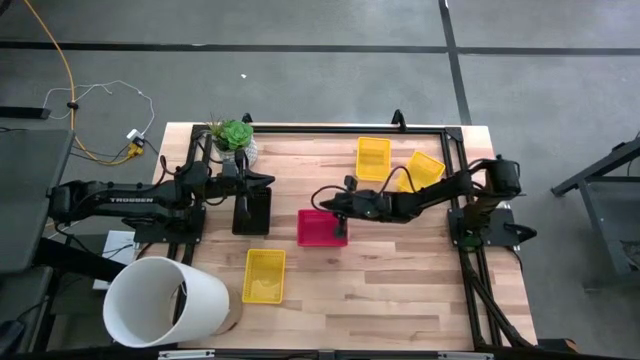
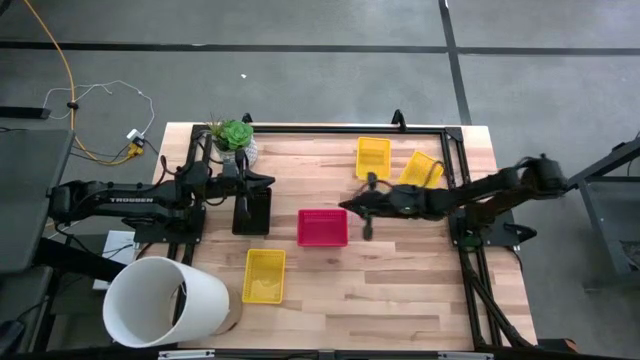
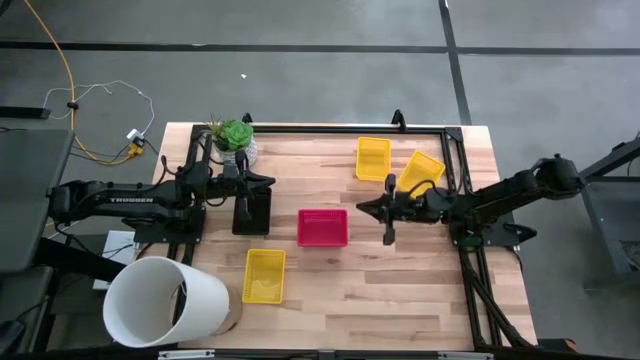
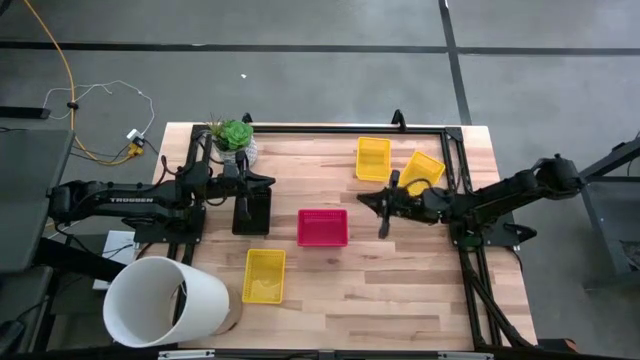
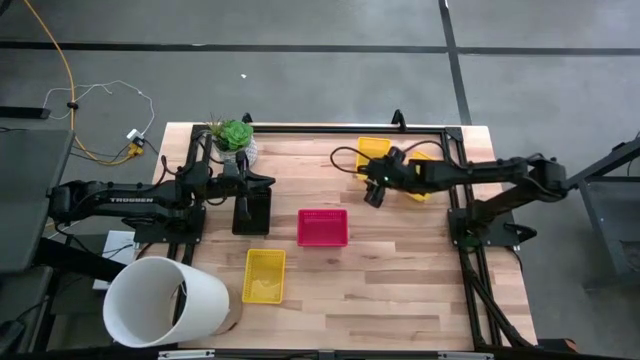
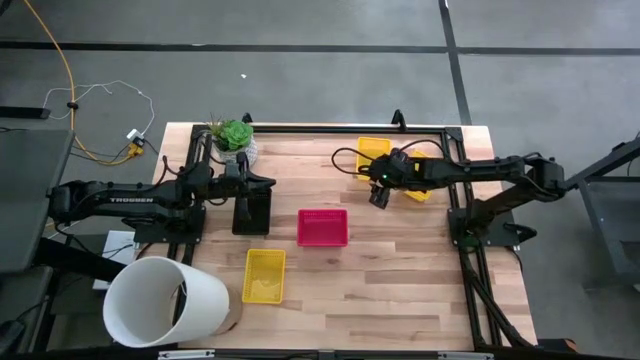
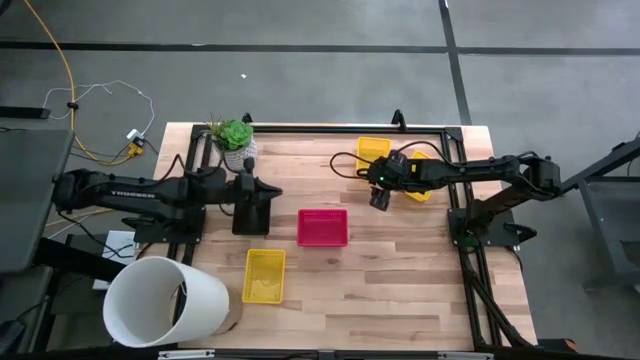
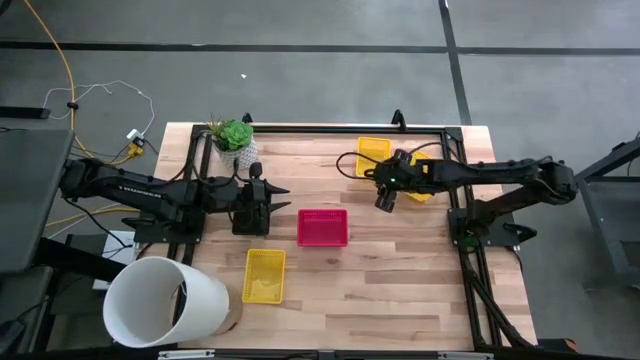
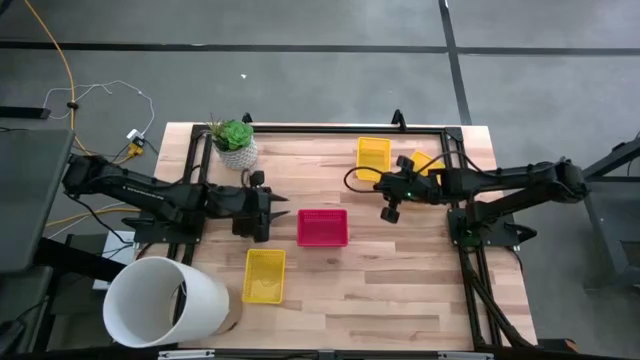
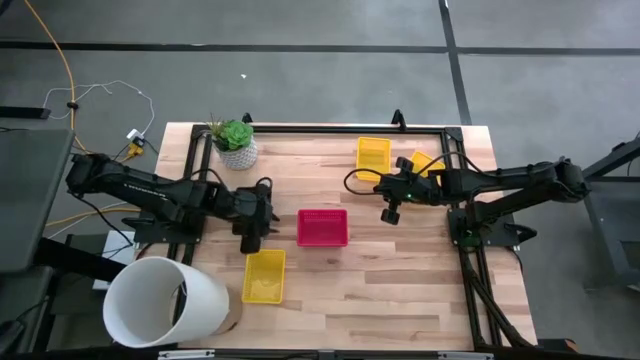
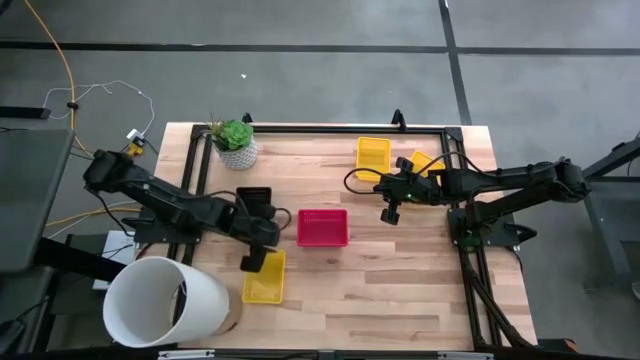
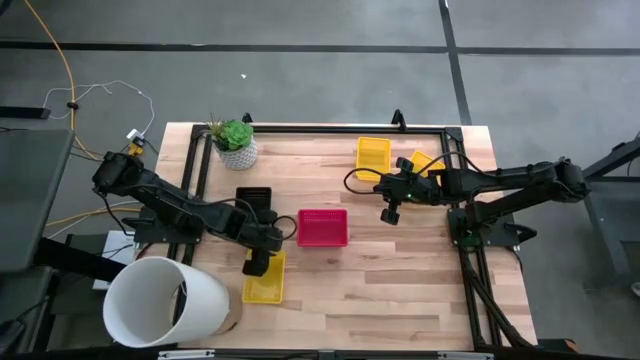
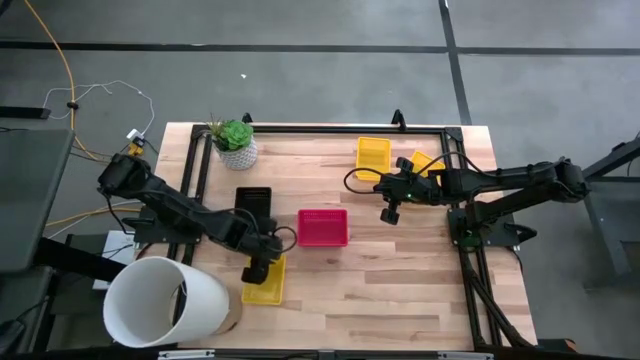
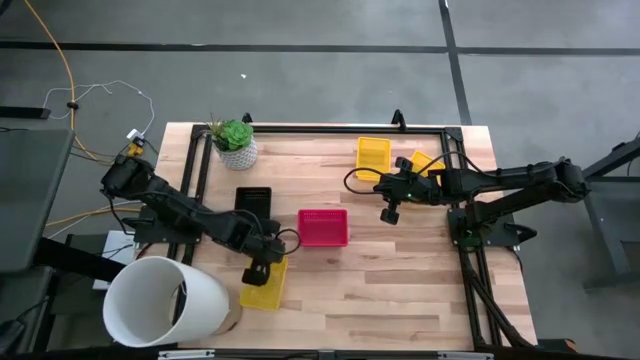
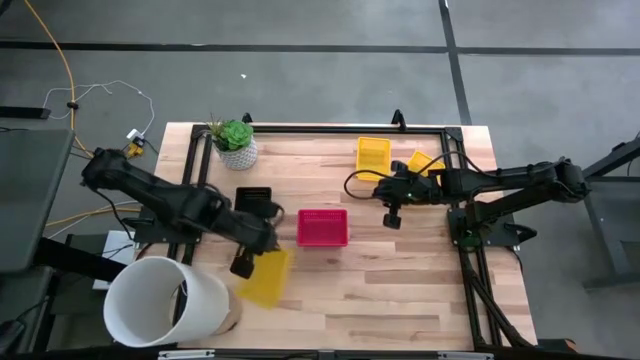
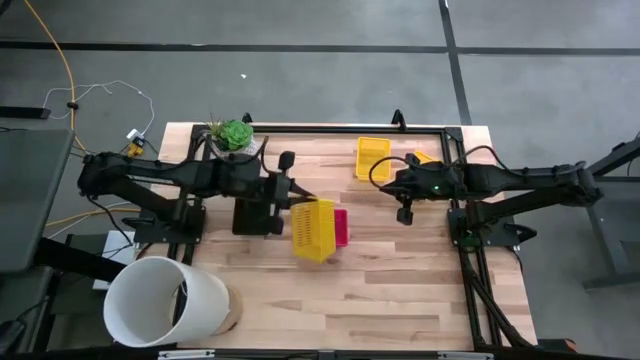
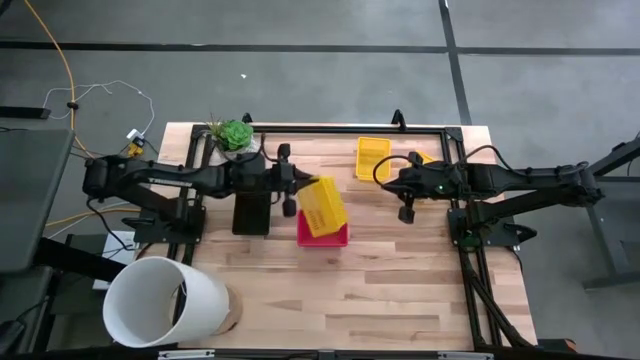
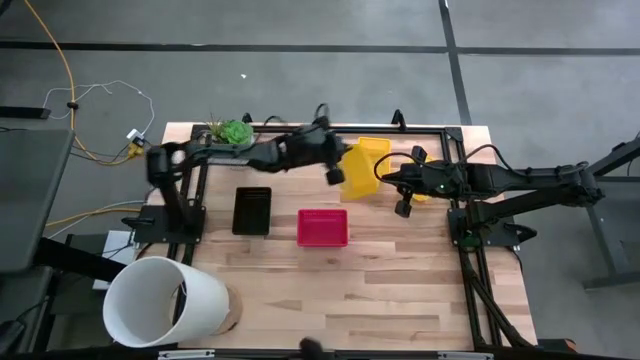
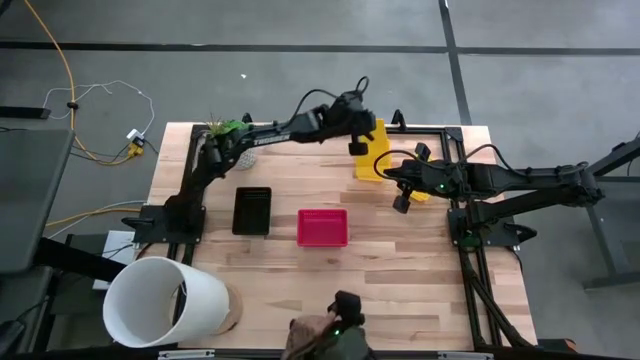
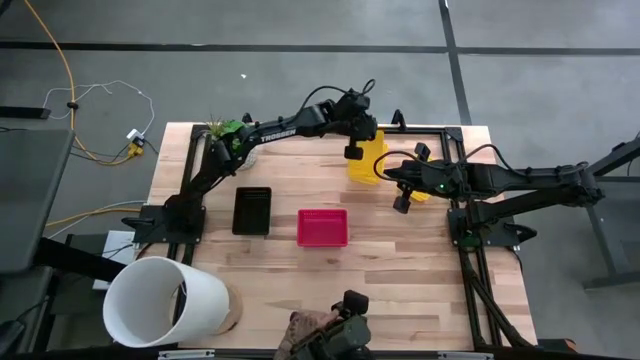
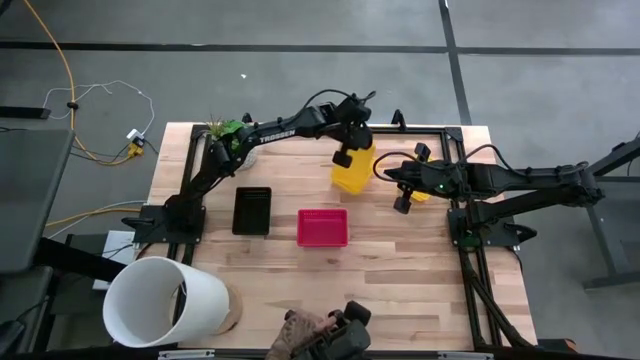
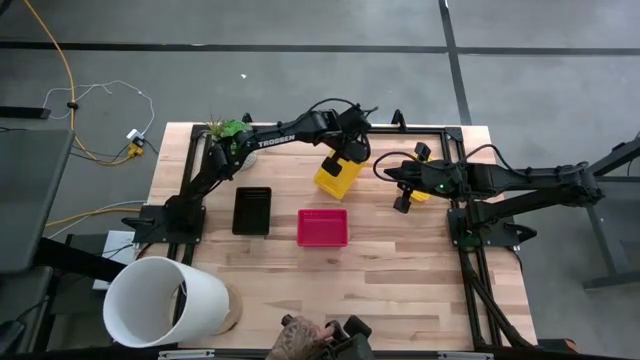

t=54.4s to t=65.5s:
Stack the bottom yellow bin into the top left yellow bin

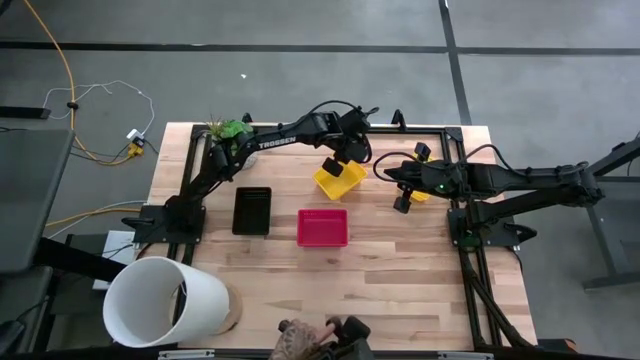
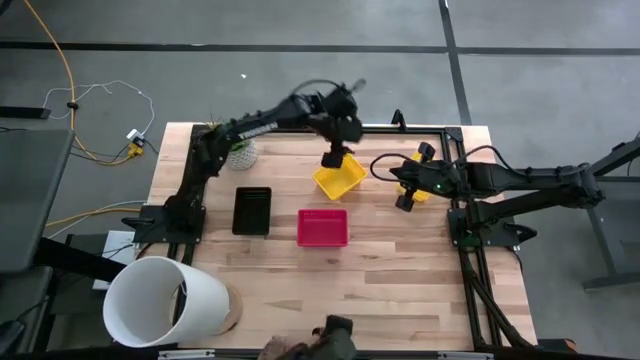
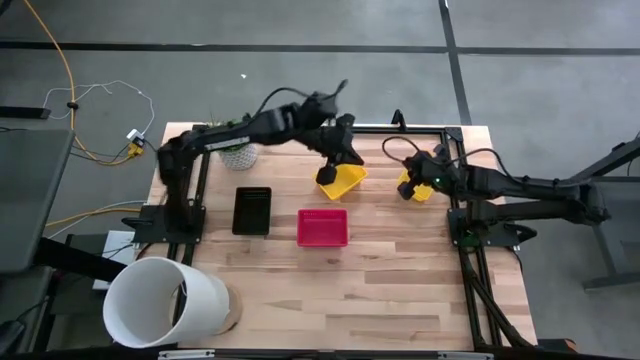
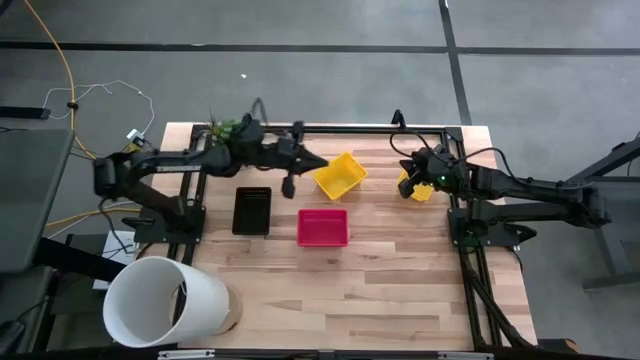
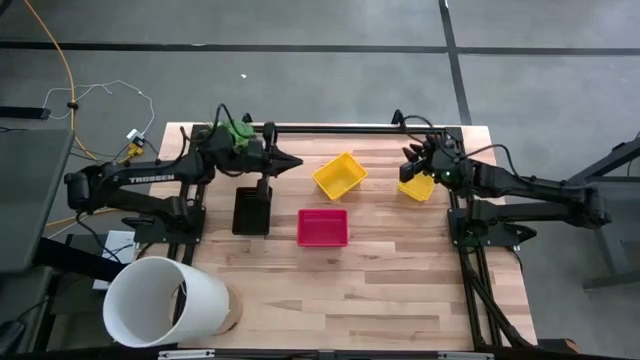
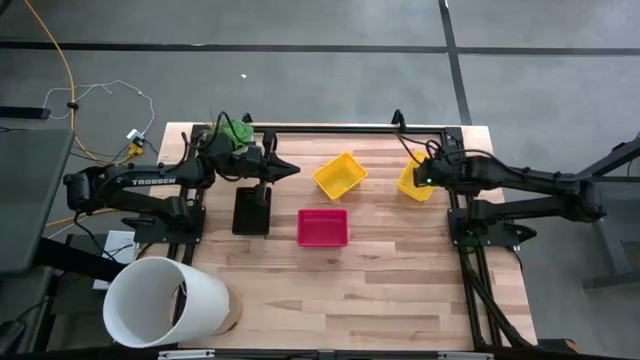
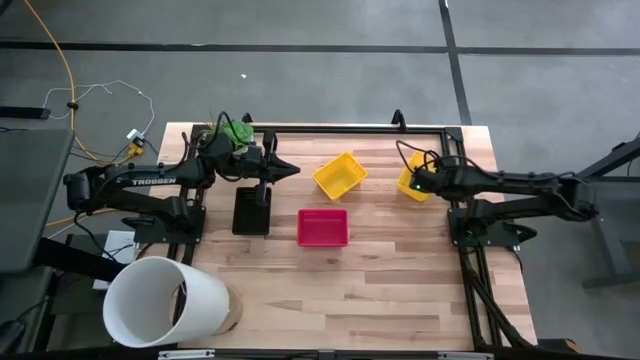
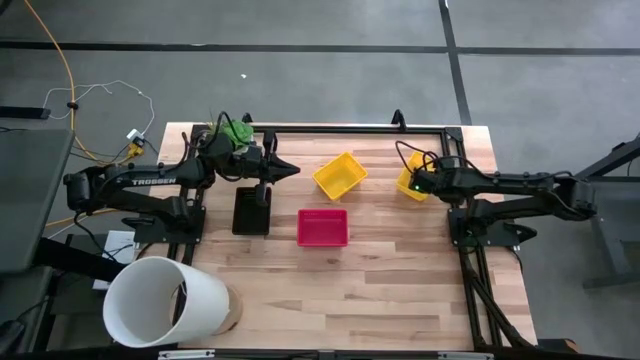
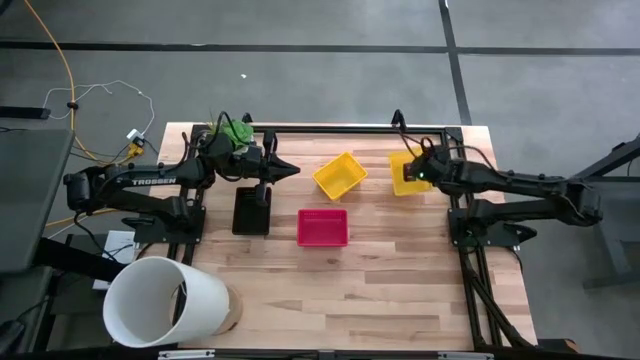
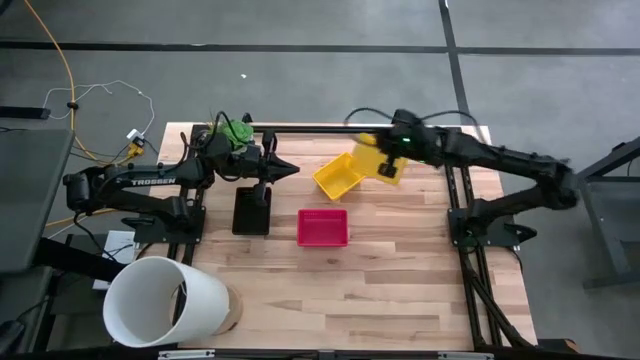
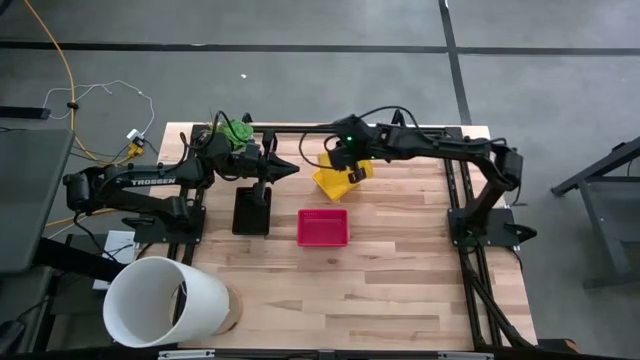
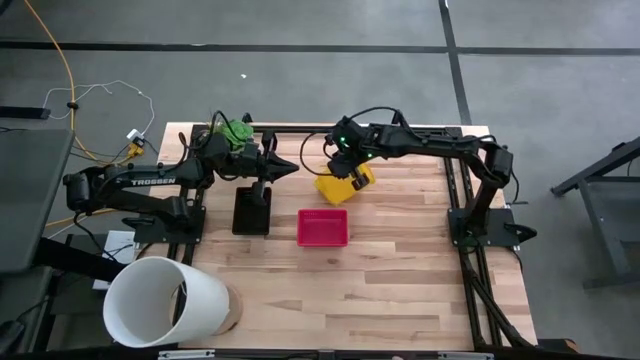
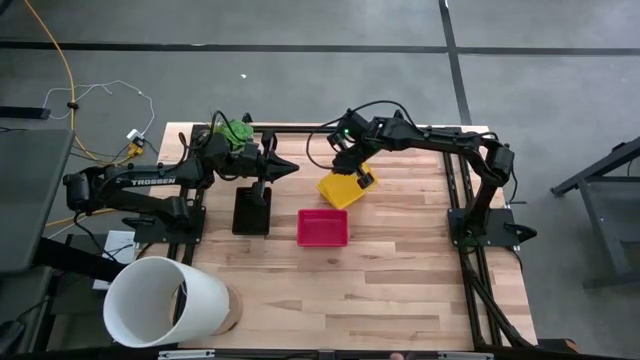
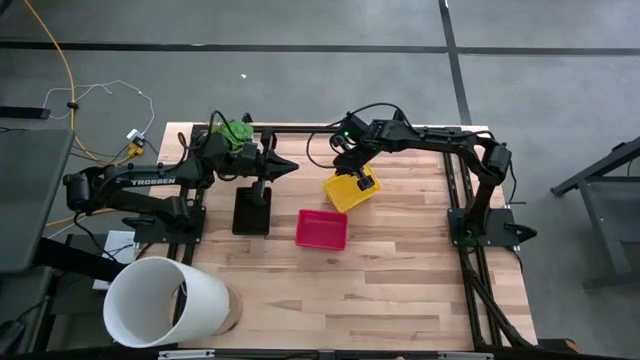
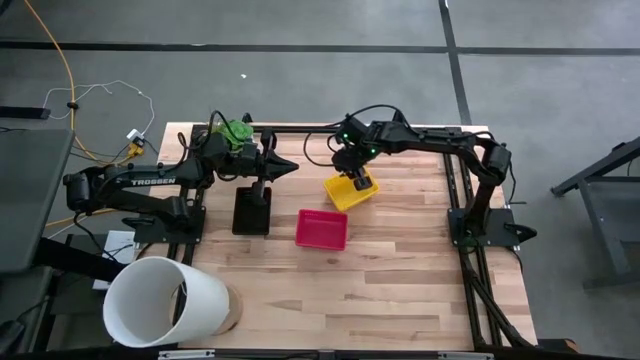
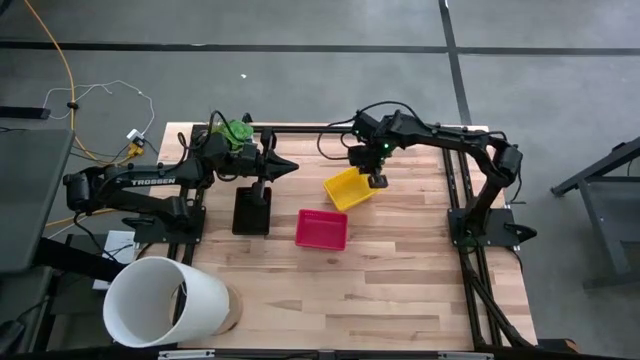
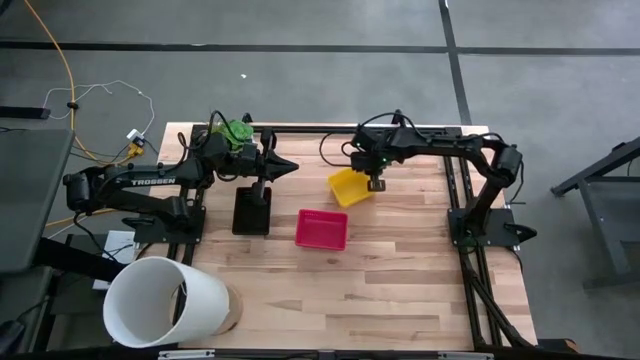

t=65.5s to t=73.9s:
Stack the right yellow bin on top of the left yellow bins

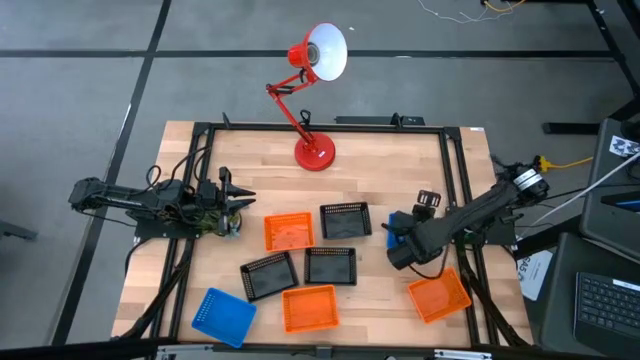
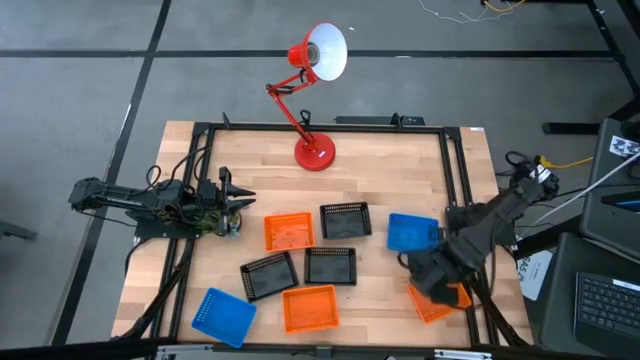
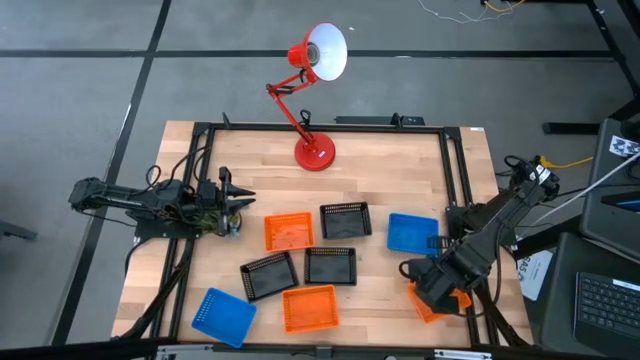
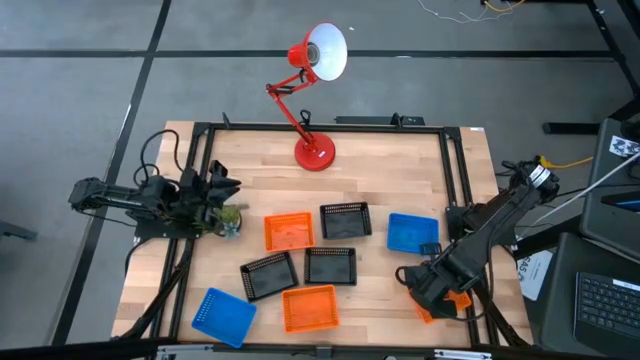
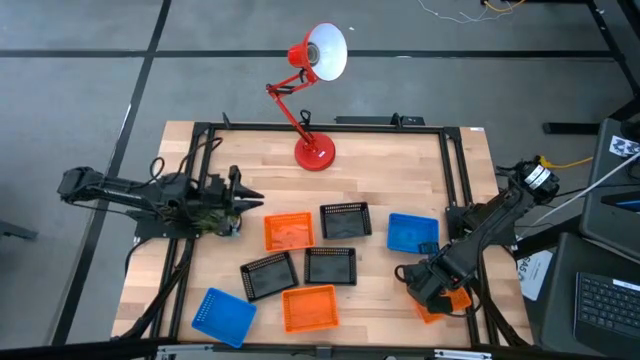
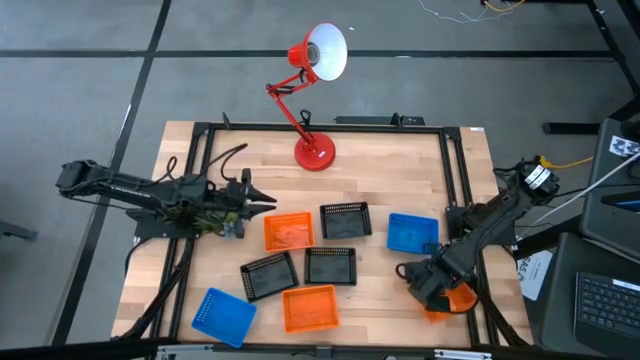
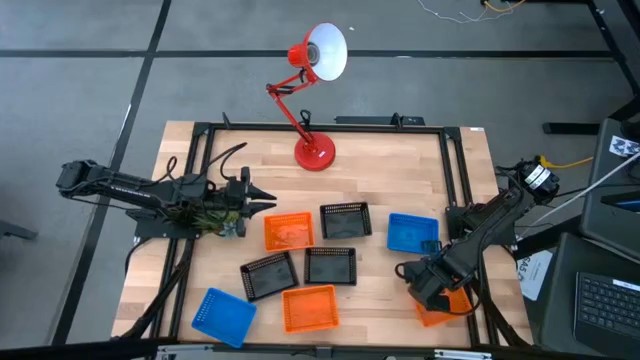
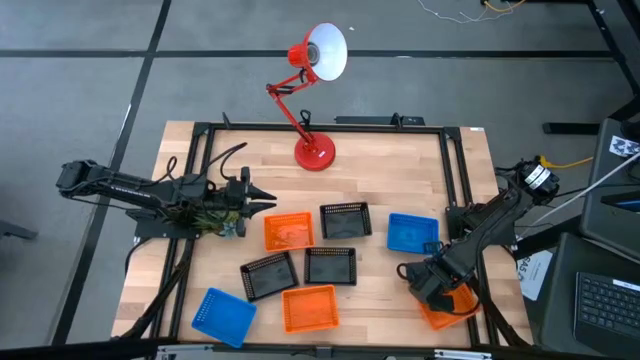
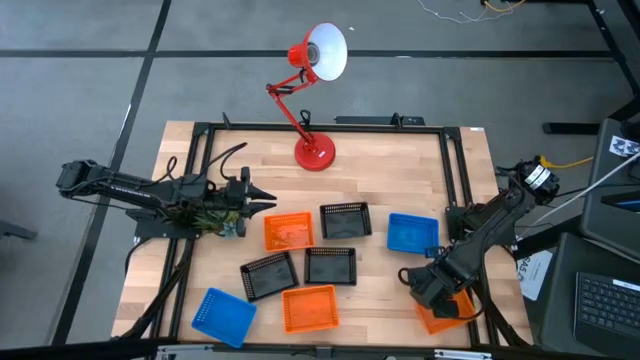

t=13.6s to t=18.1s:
Stack the bottom right orange bin on the top orange bin
